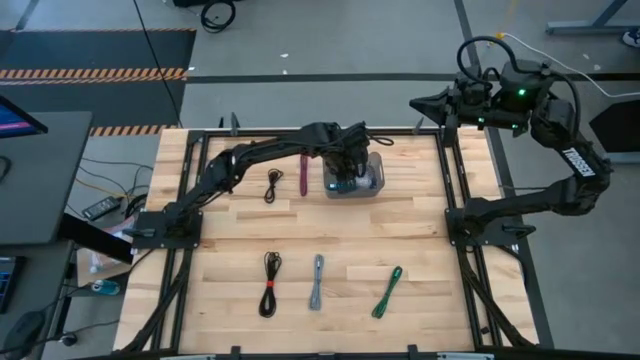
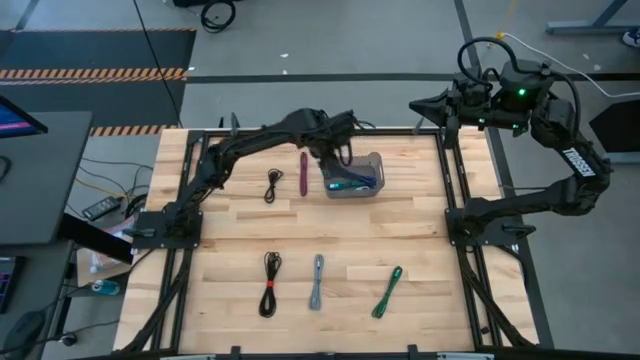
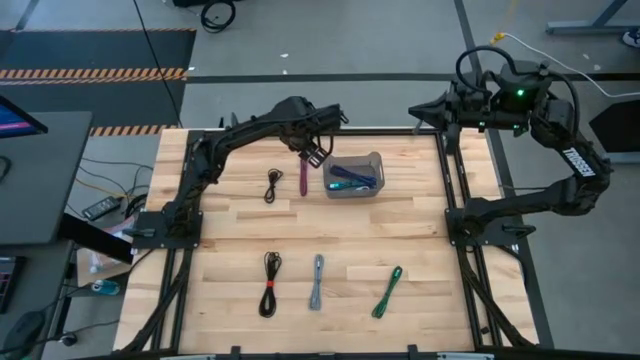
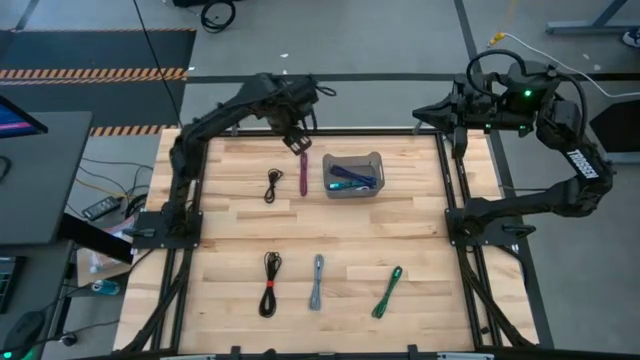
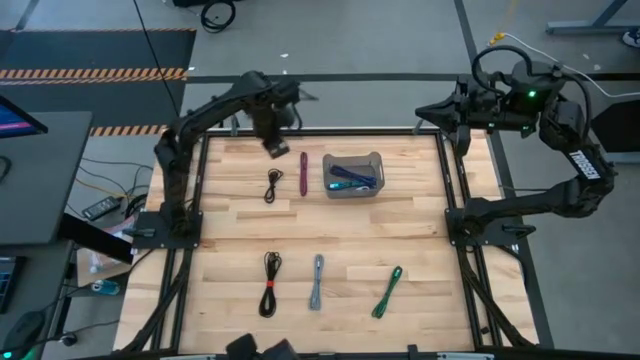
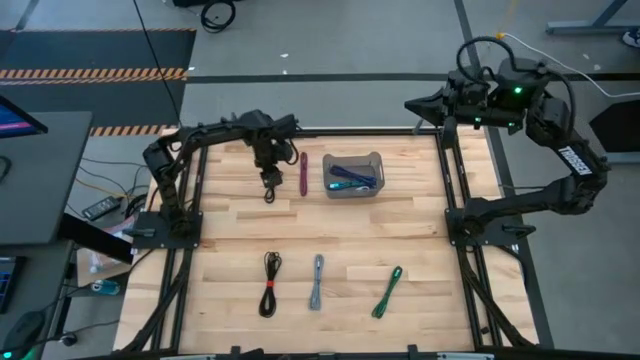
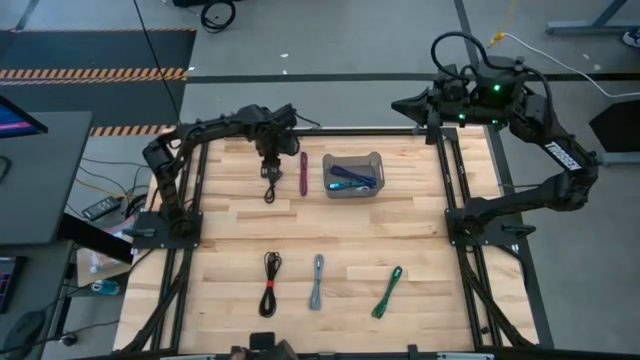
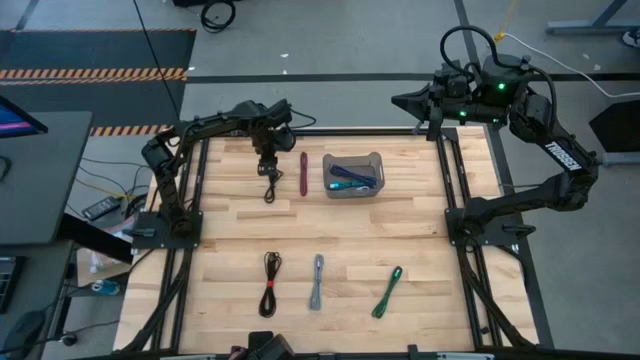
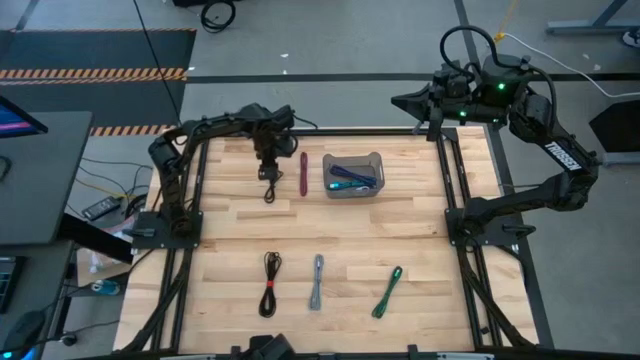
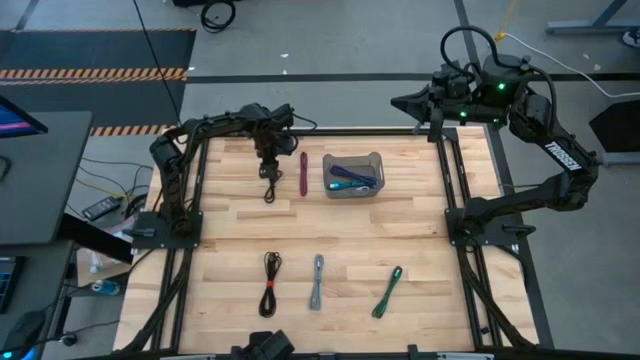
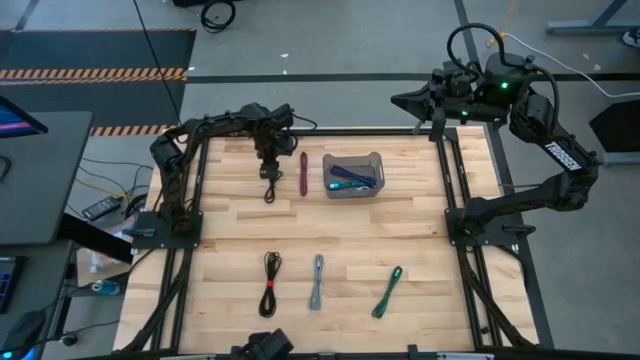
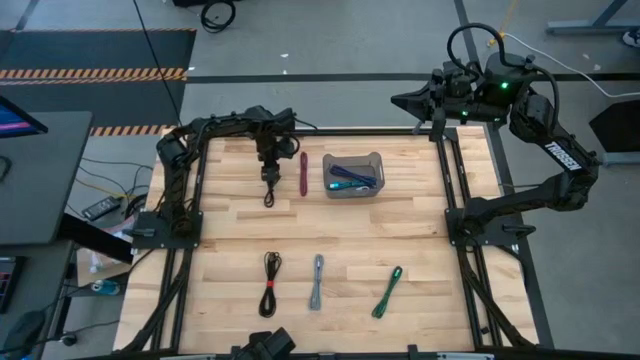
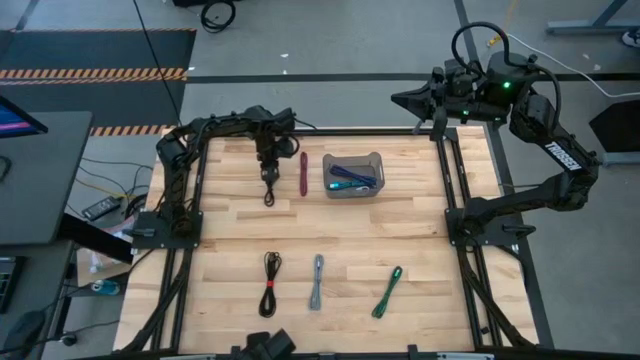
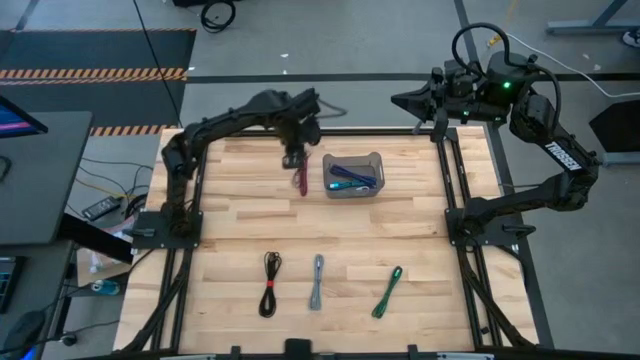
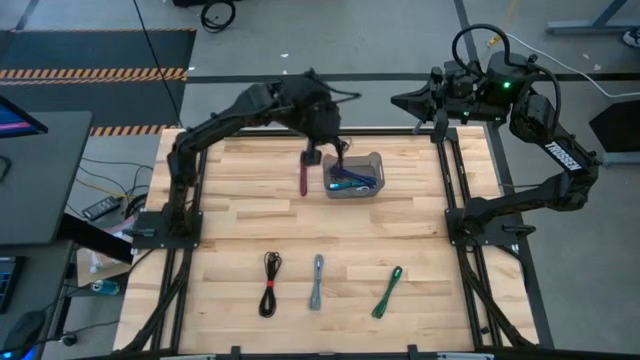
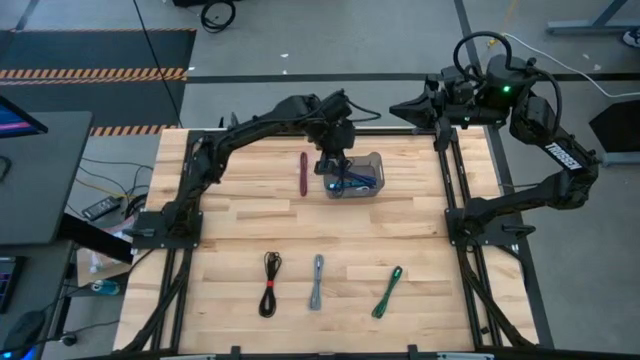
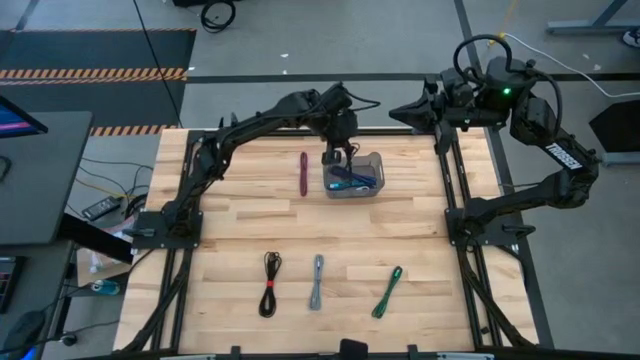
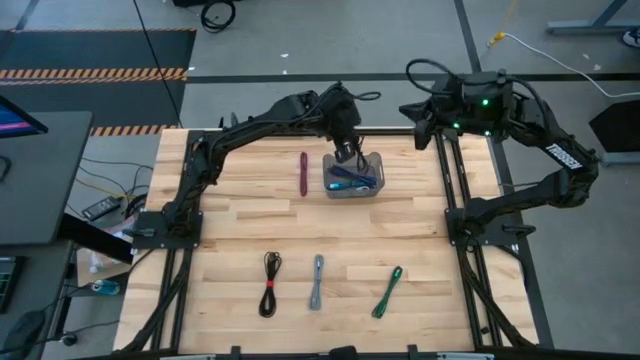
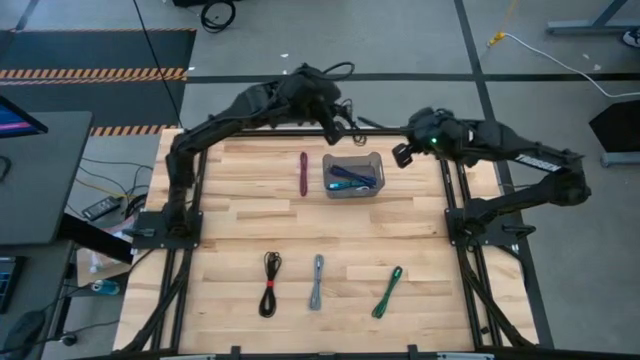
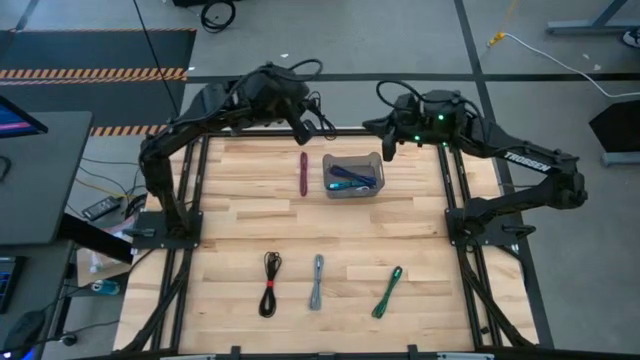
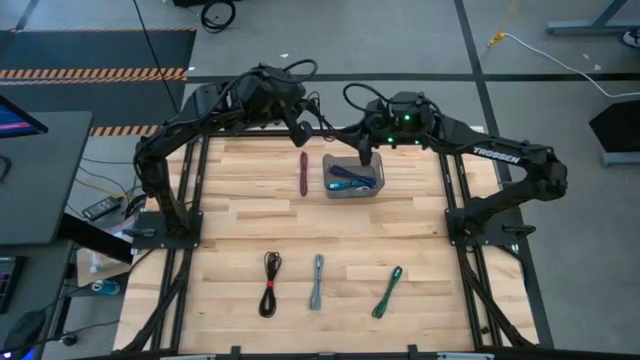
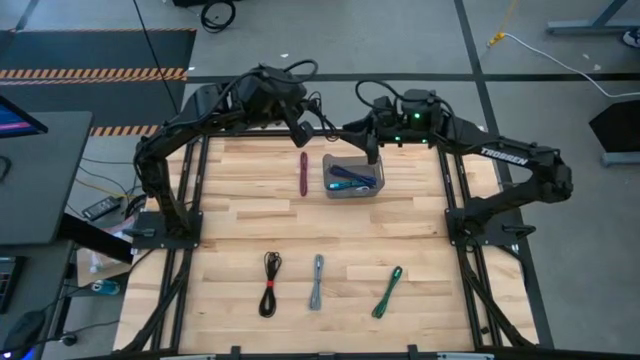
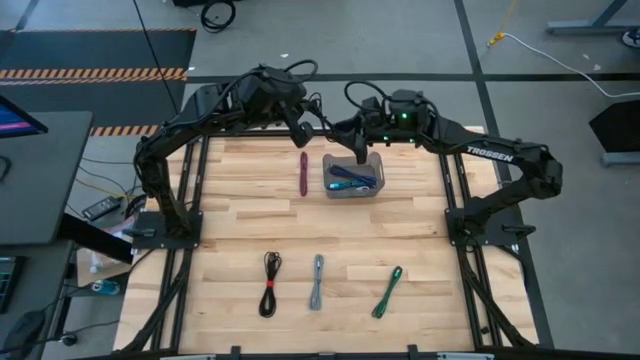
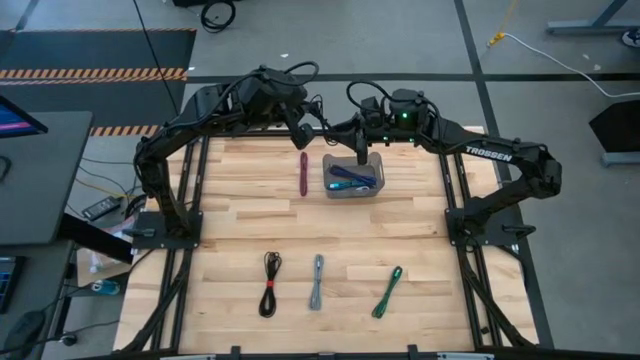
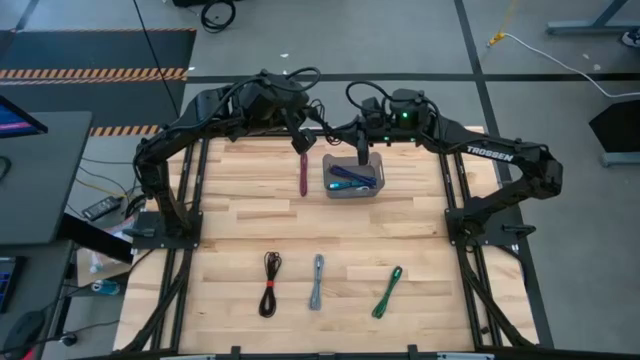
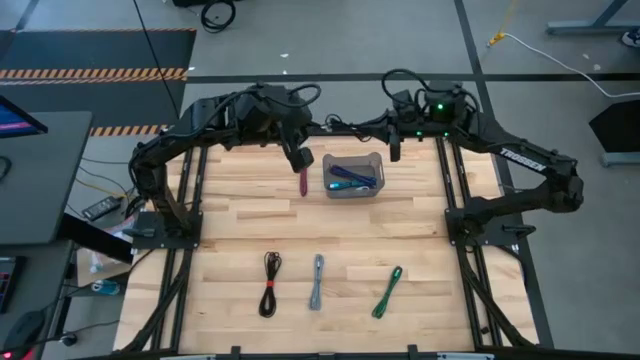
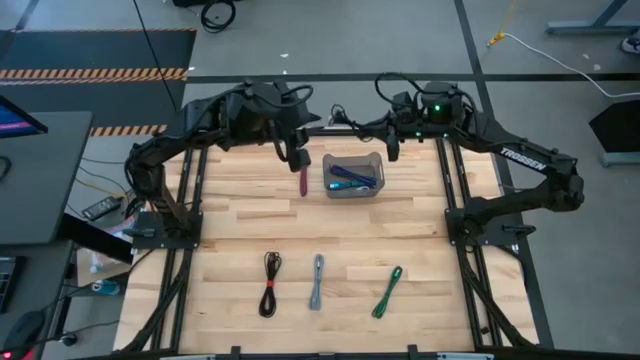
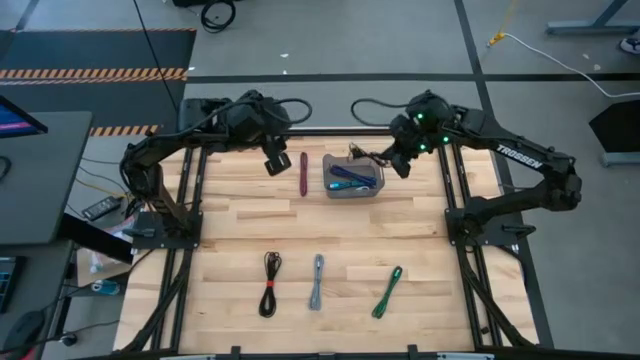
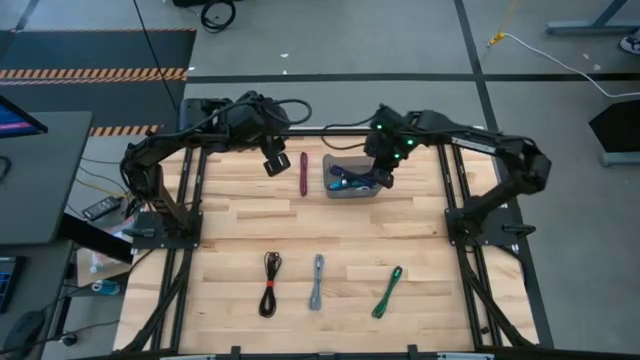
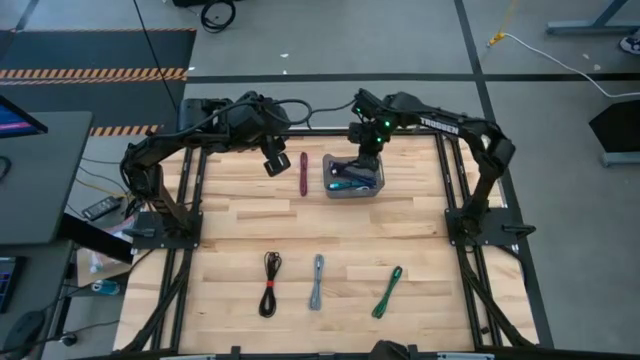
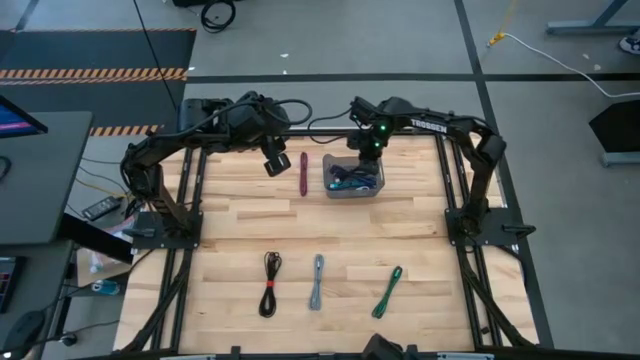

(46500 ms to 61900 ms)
Task: Pick and place USB-C Cables
Put the top black charger cable into the black bin

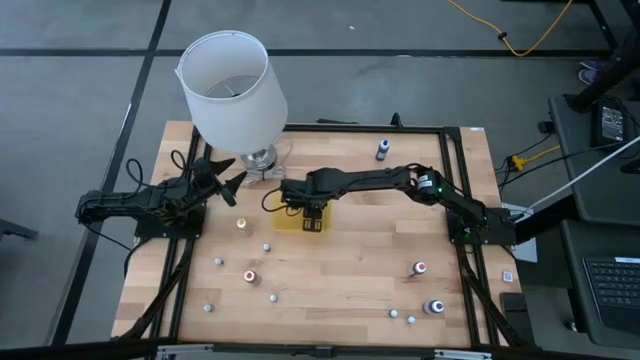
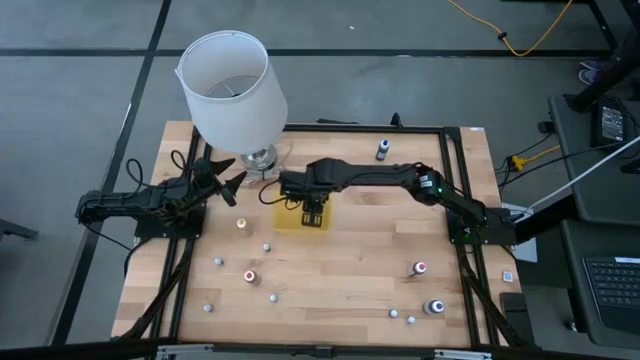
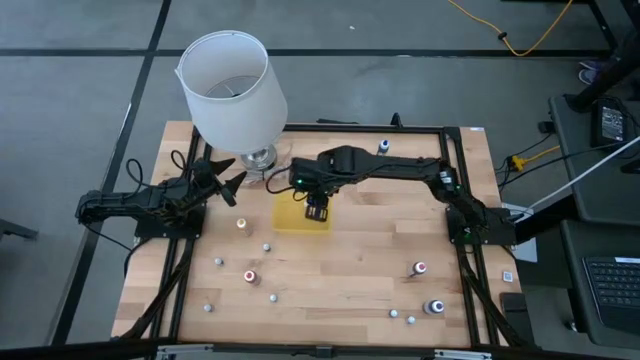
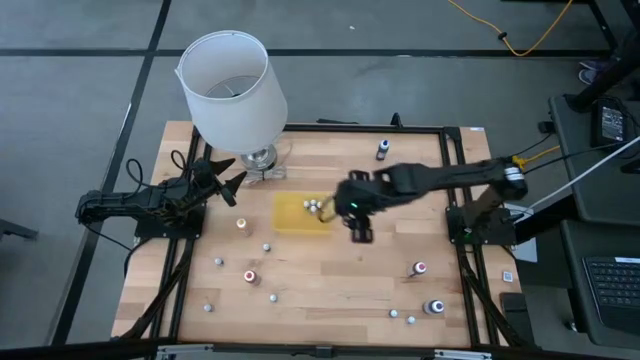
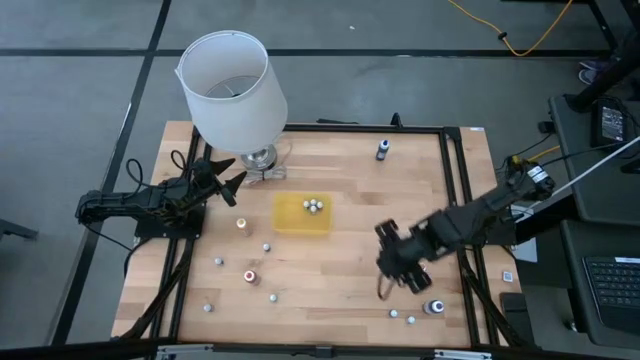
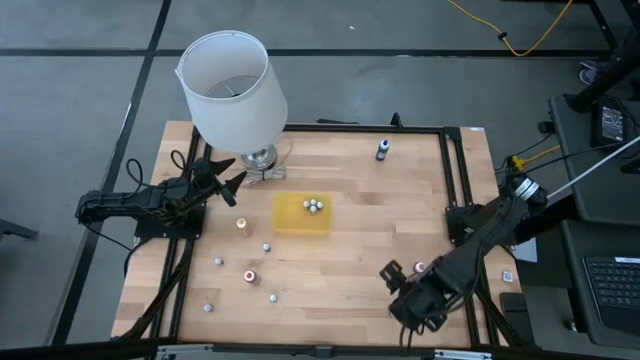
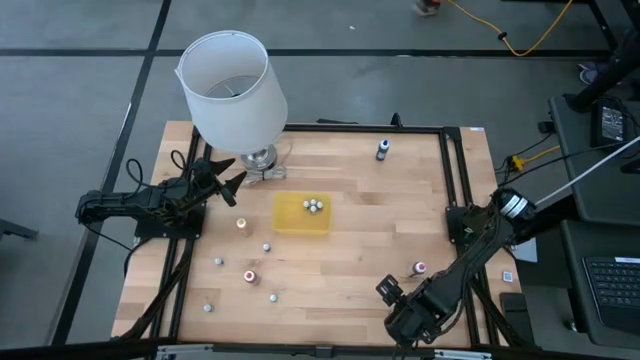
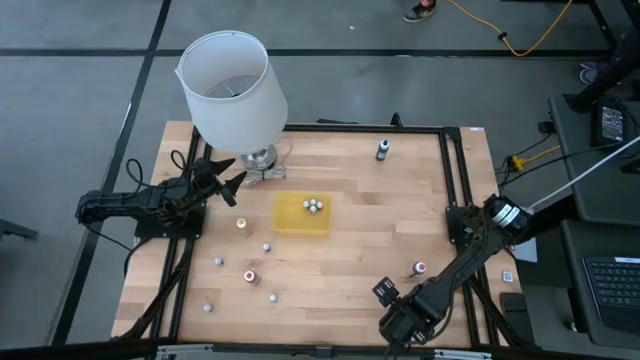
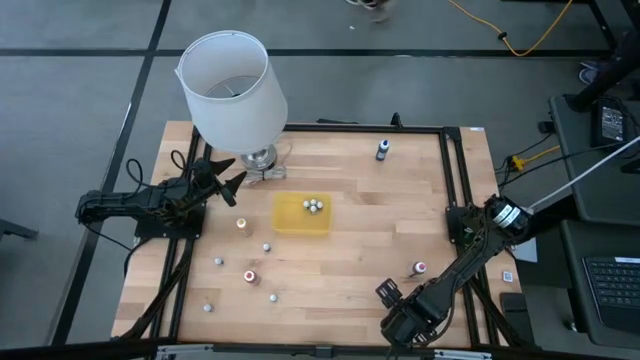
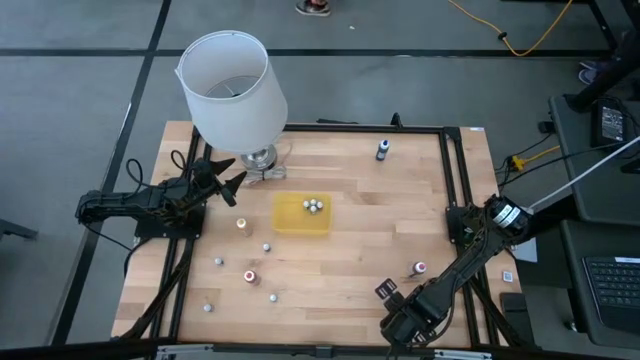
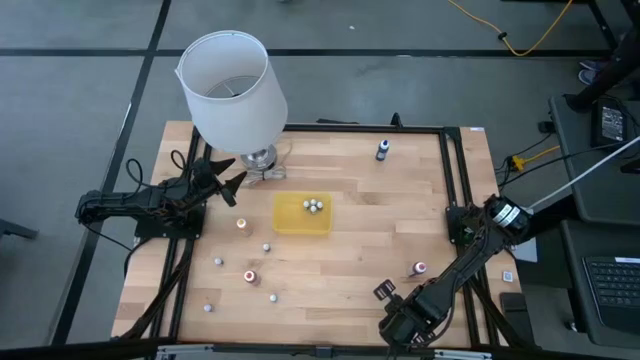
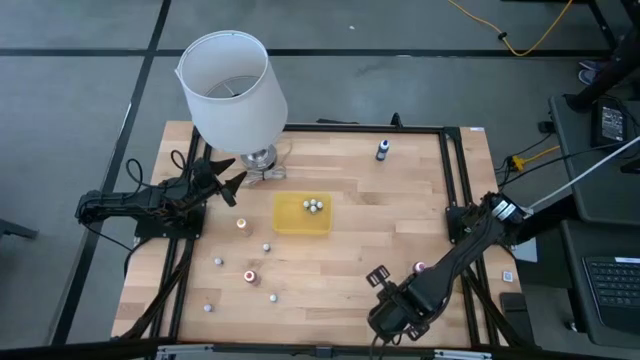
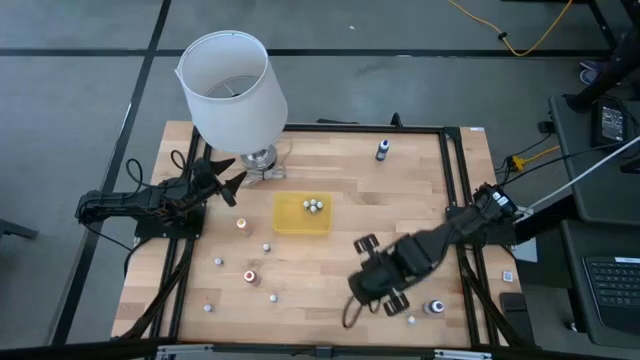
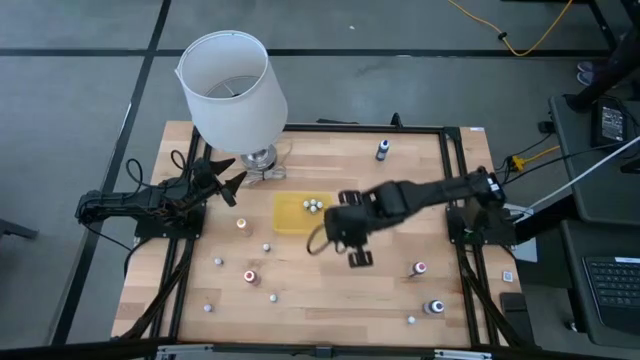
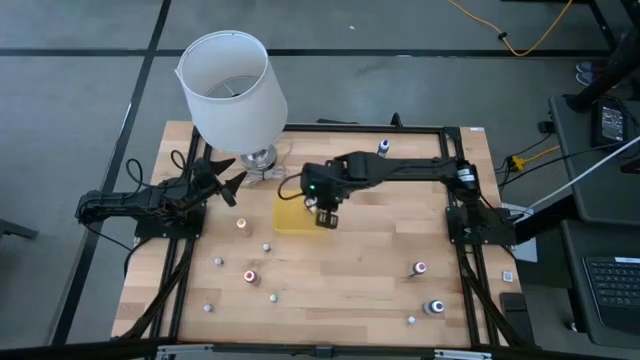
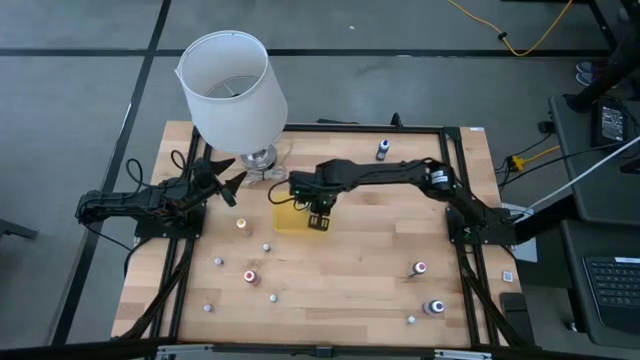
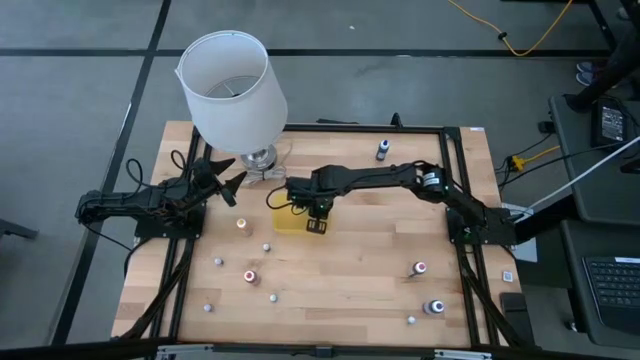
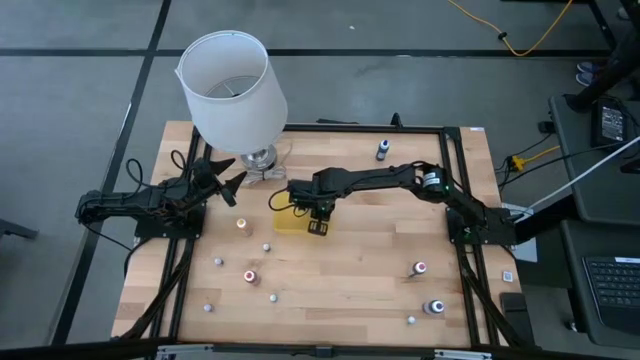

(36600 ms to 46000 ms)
Task: Pick & Place food coloring
Put the blue food coloring bottle into the yellow bin
